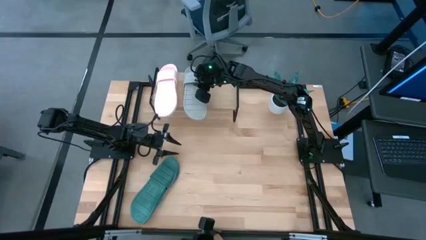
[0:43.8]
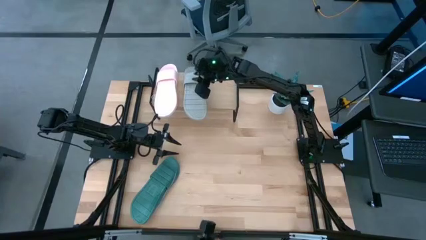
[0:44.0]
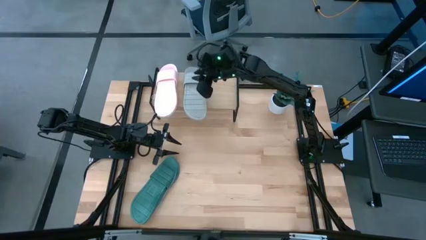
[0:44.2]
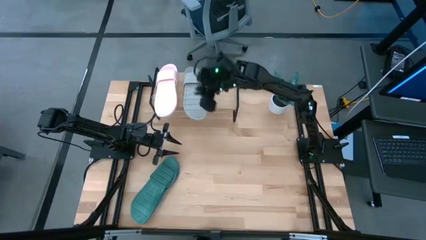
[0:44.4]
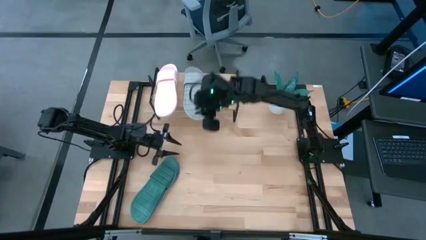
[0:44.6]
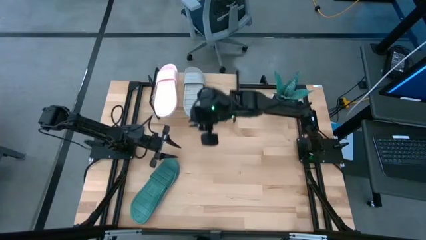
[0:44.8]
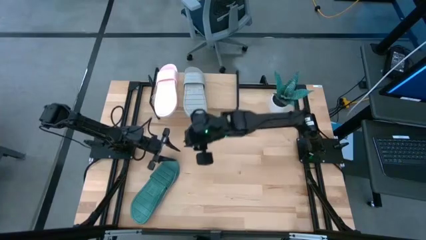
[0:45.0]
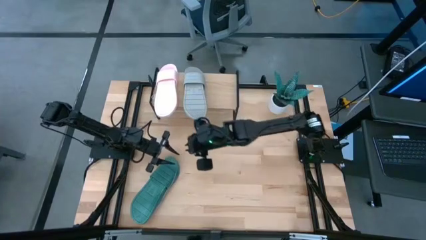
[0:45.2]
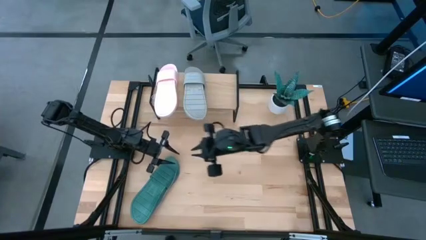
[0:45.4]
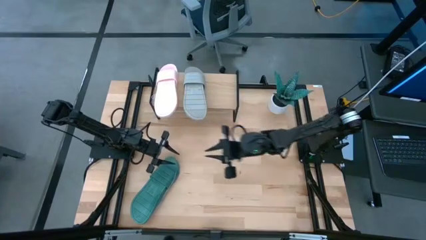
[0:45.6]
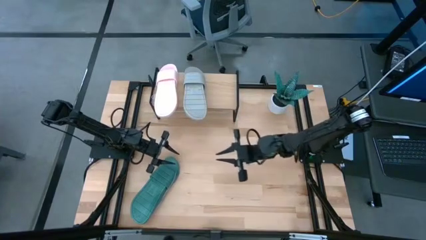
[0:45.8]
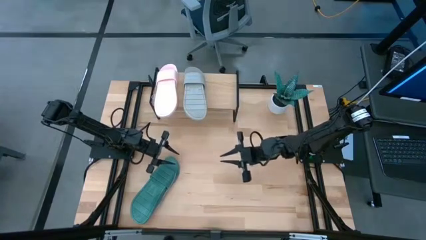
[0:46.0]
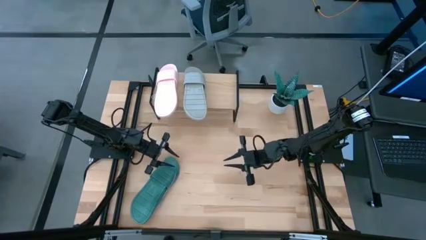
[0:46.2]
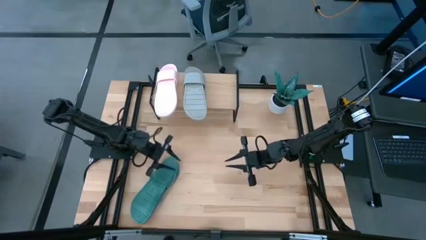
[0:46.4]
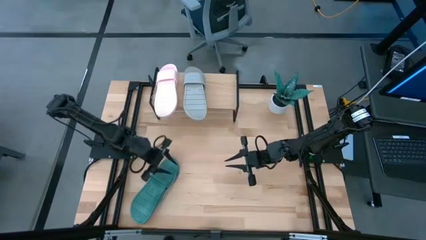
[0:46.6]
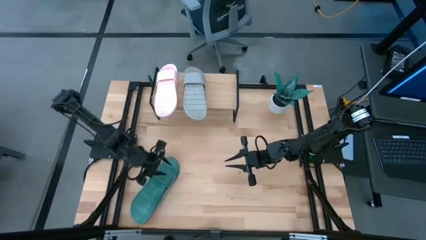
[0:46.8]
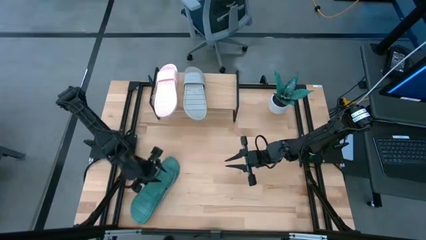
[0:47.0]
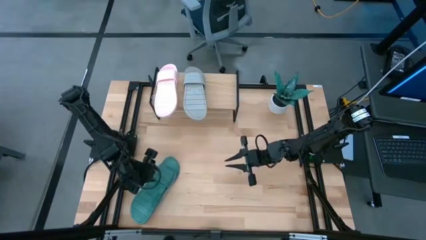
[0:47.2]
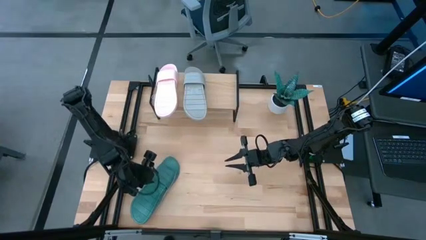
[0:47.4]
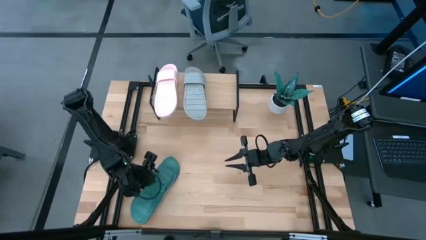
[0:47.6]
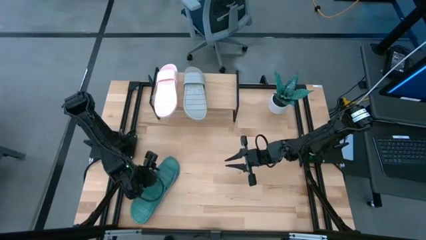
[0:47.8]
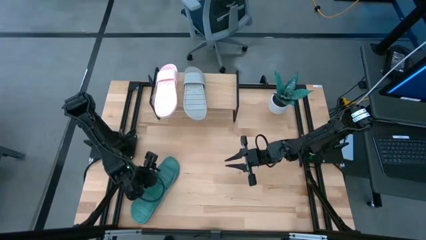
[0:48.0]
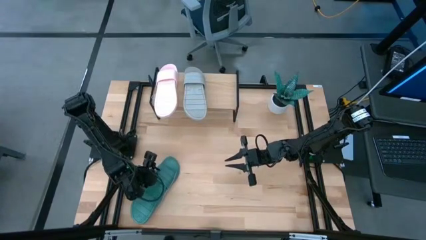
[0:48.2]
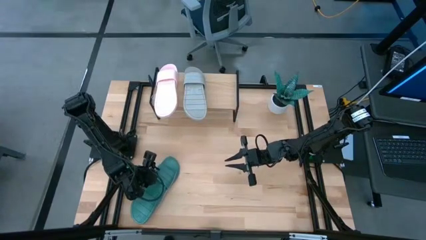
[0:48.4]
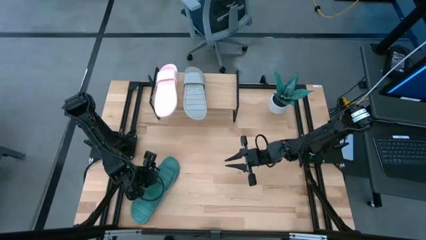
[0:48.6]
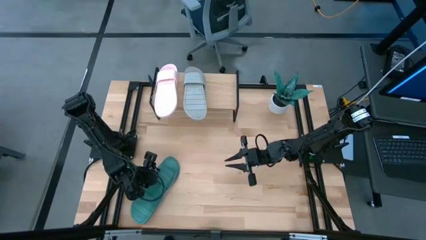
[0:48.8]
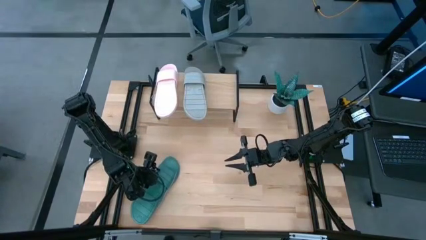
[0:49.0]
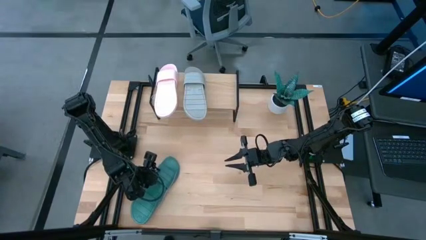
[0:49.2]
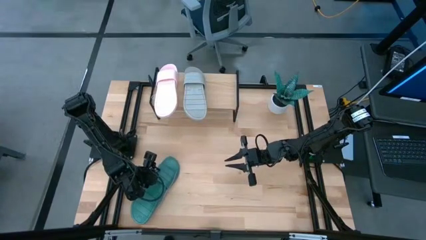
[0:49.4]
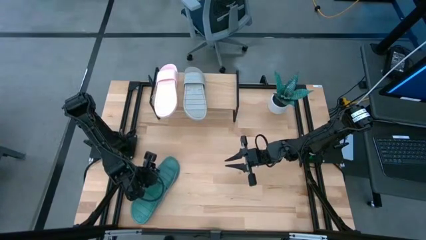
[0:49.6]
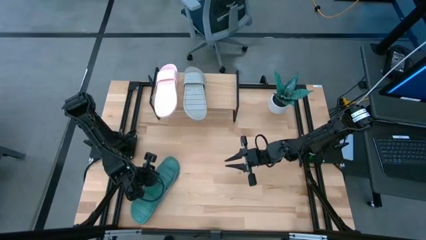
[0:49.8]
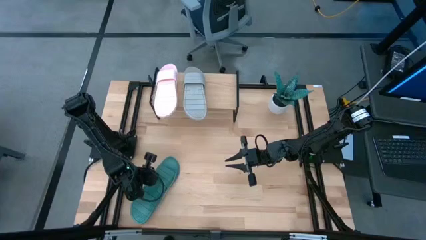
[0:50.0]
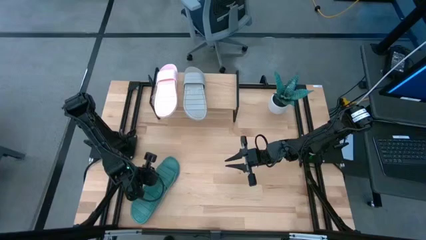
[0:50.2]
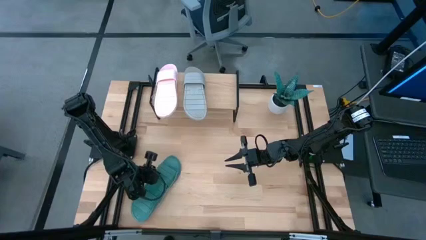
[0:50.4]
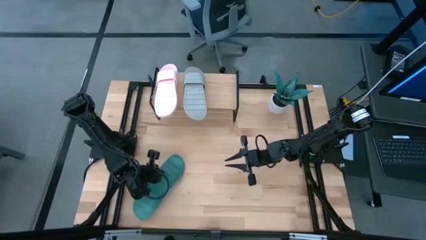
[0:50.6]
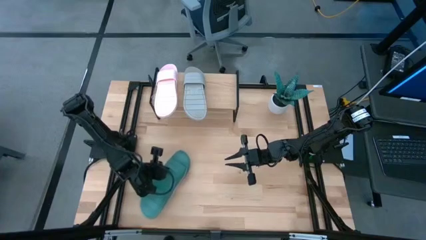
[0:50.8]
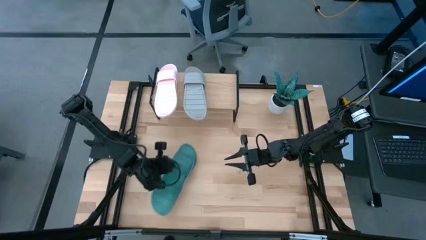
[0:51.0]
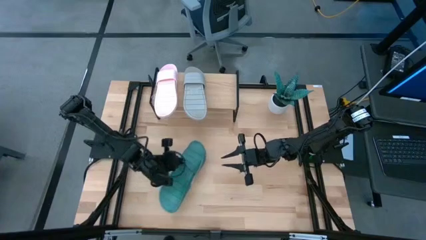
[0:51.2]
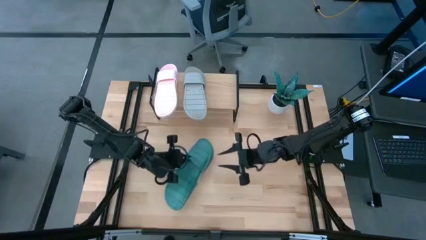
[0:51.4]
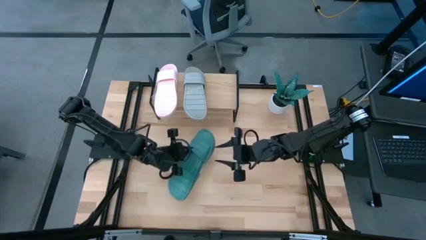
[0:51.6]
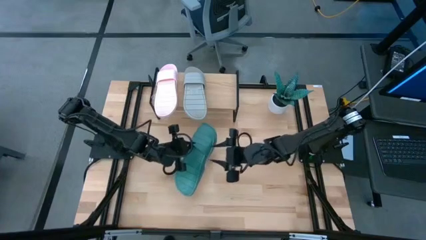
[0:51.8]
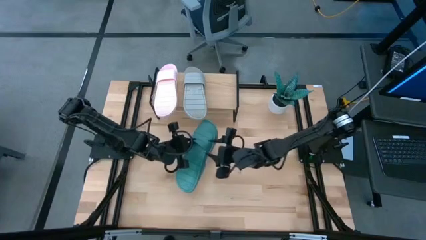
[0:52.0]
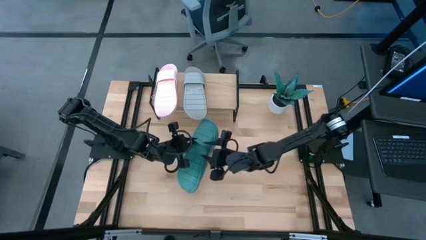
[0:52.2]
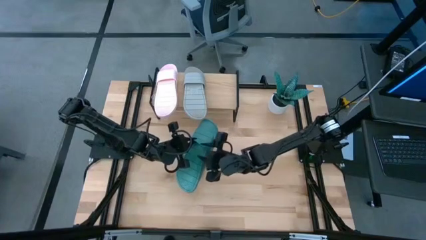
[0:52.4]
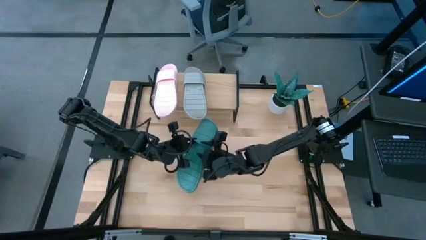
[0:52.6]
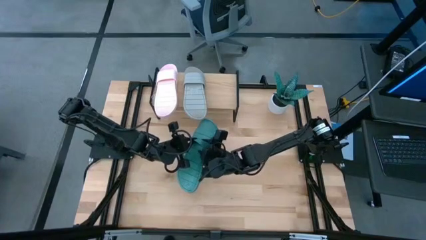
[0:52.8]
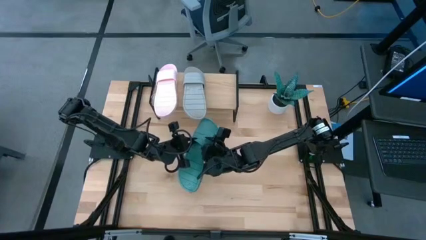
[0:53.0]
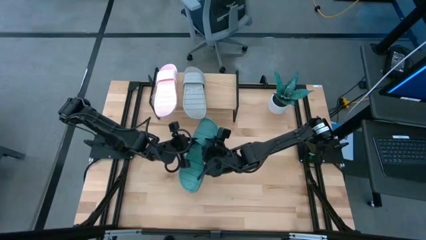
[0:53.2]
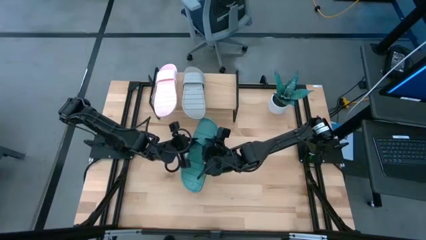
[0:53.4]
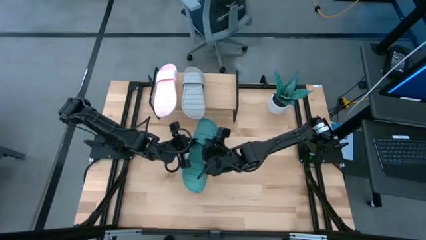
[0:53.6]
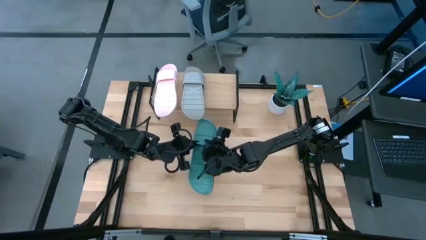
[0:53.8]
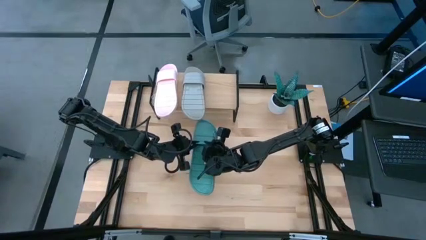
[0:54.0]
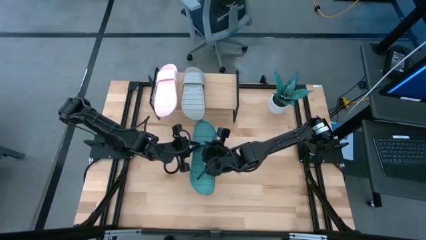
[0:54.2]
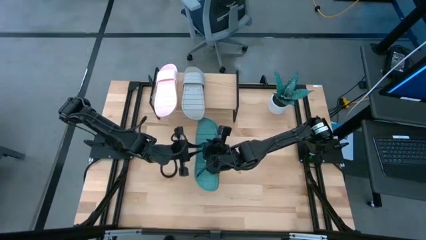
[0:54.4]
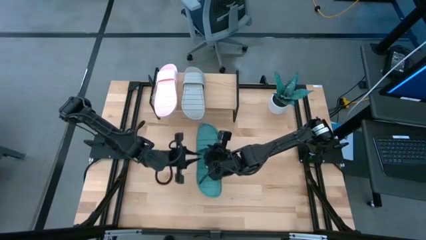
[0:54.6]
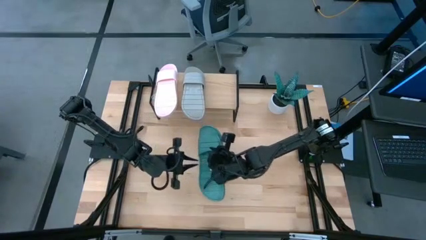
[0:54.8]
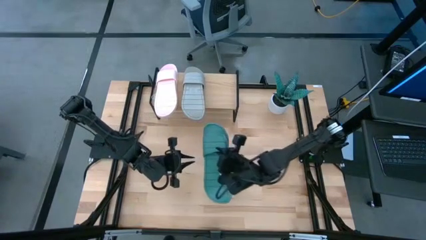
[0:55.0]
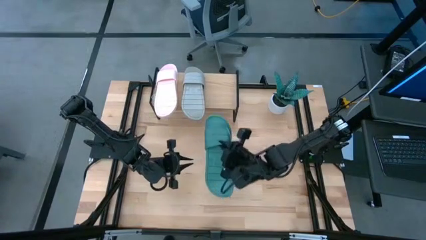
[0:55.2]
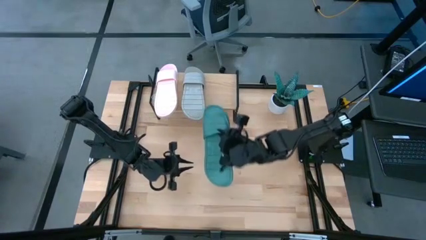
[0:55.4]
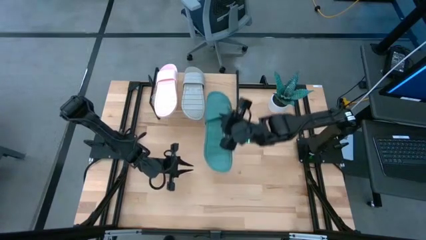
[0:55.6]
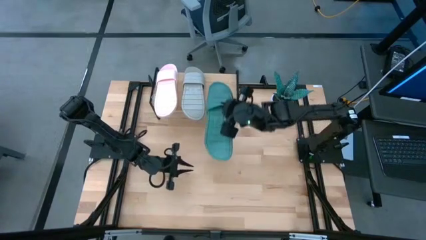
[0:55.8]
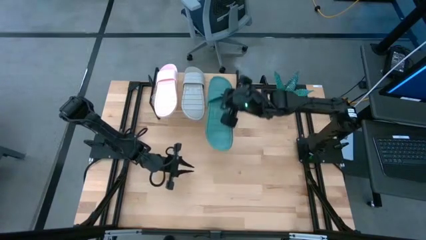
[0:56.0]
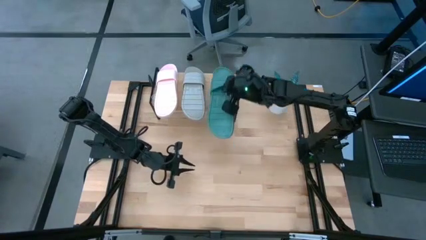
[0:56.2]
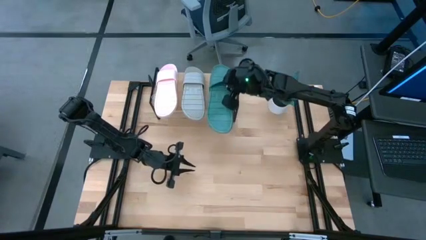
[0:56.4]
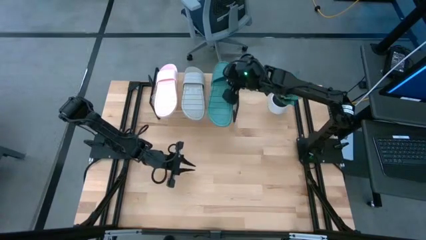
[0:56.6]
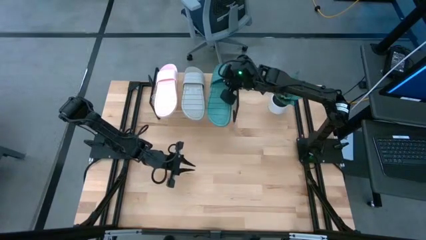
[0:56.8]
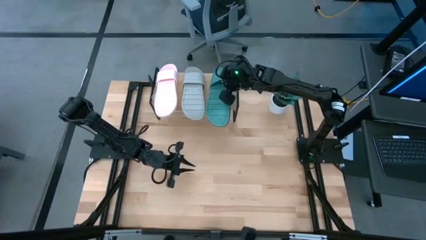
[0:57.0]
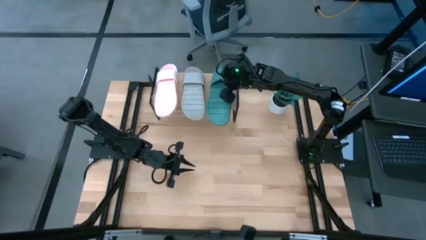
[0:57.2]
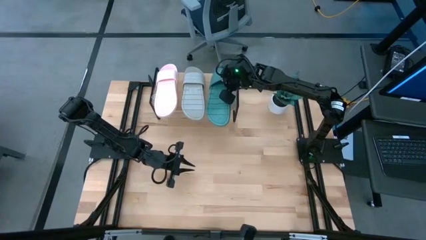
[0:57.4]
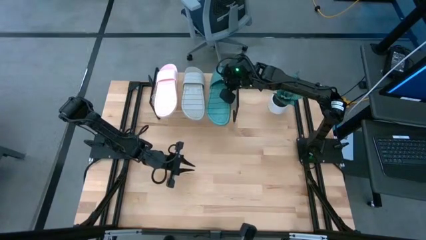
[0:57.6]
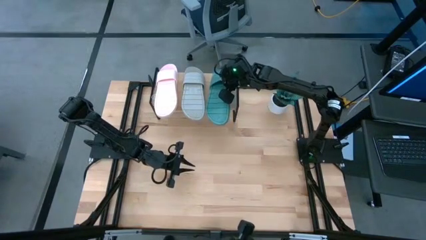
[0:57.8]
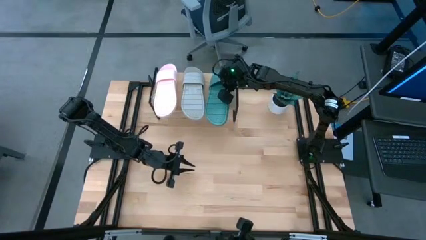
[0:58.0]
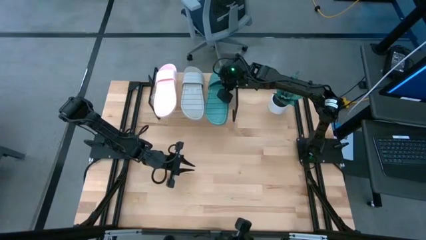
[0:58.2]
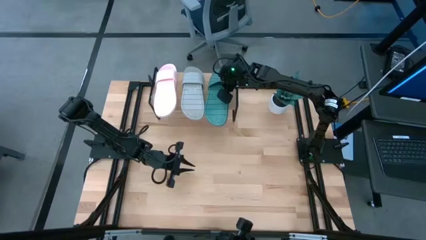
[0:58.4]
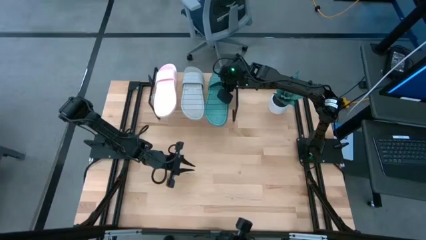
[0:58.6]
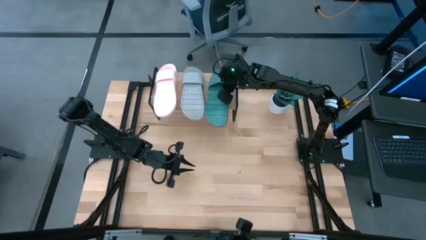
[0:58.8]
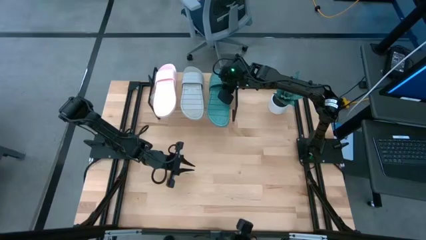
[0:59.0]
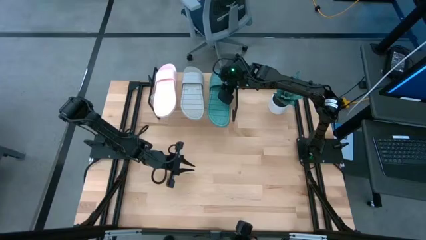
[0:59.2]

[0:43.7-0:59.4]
Task: Pick and place slides into the shelf
Put the green pair of slides on the shelf
